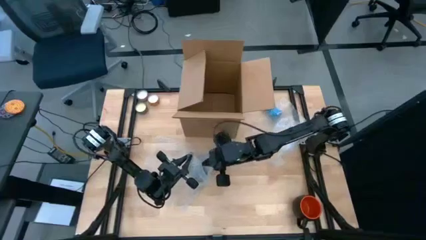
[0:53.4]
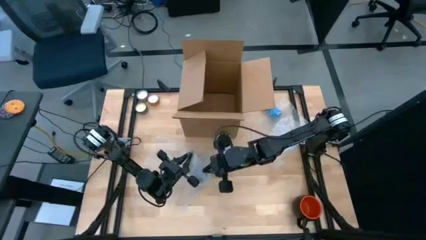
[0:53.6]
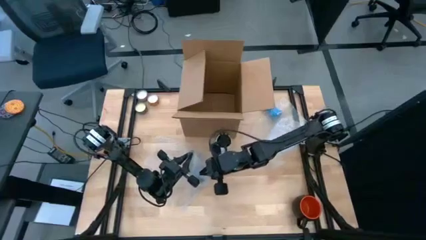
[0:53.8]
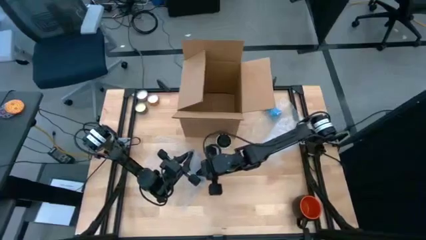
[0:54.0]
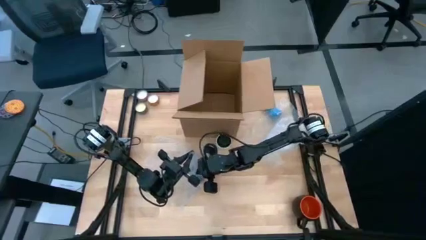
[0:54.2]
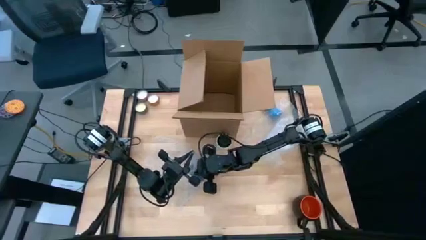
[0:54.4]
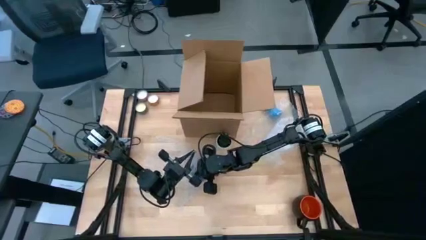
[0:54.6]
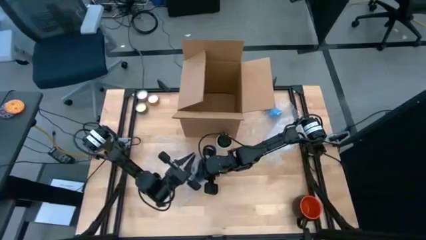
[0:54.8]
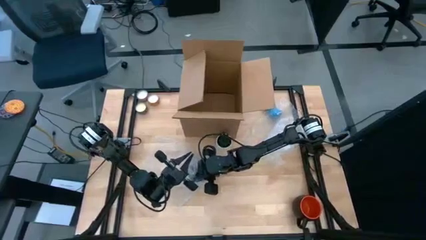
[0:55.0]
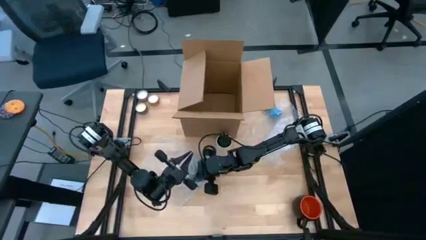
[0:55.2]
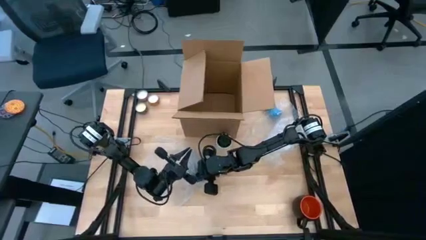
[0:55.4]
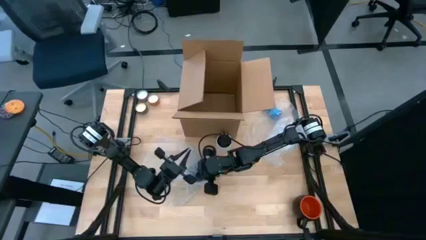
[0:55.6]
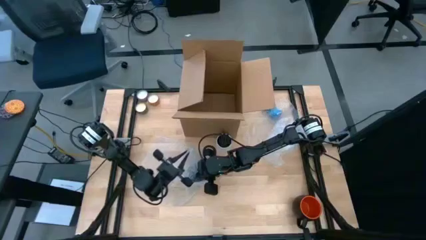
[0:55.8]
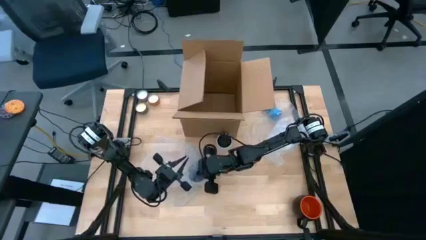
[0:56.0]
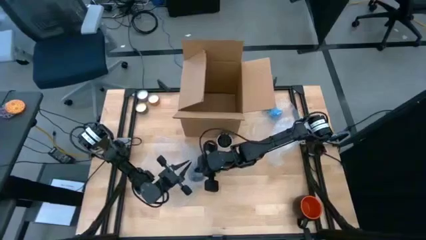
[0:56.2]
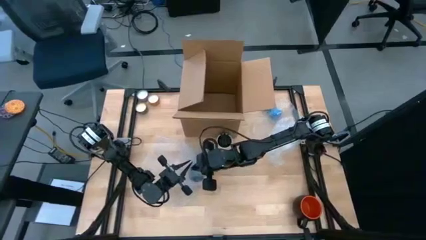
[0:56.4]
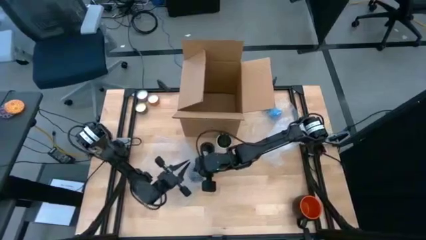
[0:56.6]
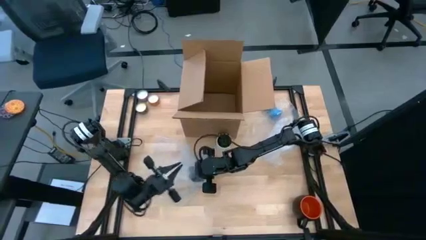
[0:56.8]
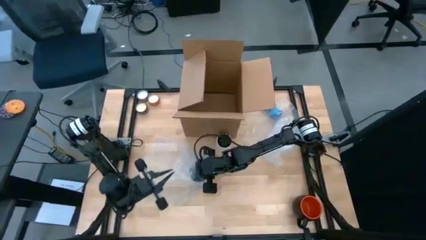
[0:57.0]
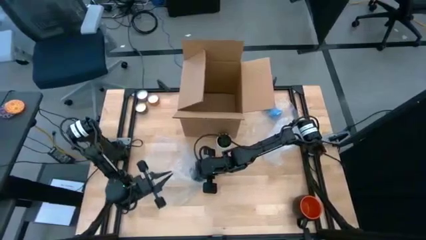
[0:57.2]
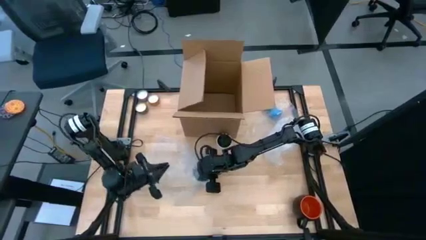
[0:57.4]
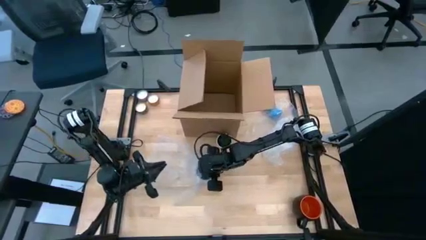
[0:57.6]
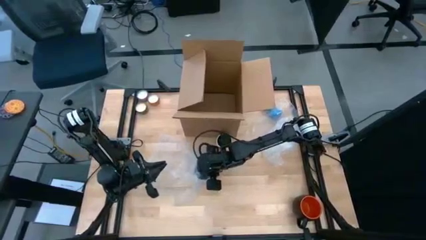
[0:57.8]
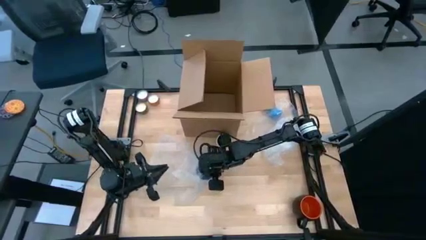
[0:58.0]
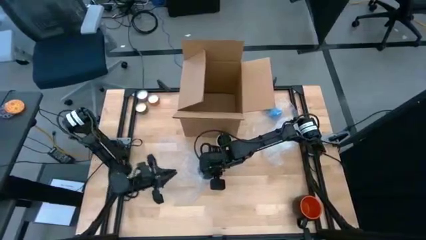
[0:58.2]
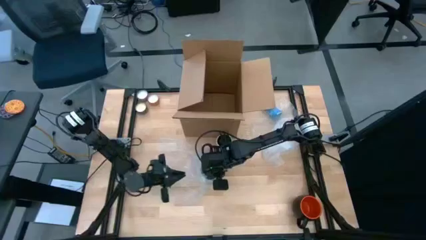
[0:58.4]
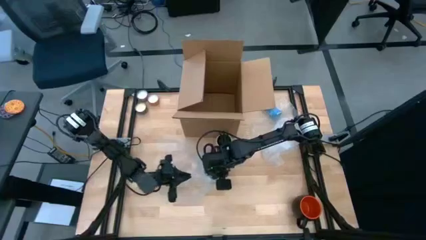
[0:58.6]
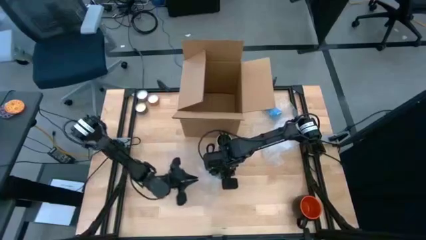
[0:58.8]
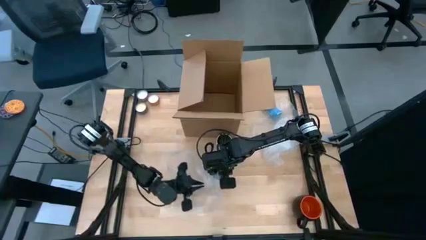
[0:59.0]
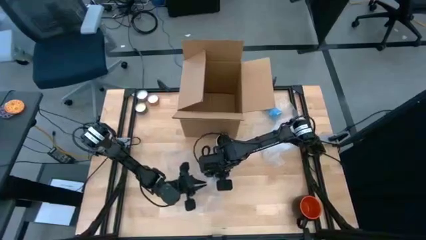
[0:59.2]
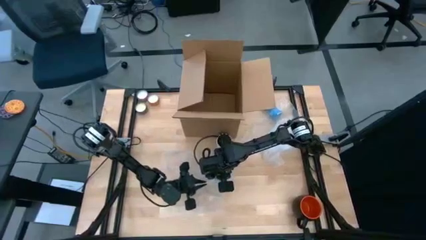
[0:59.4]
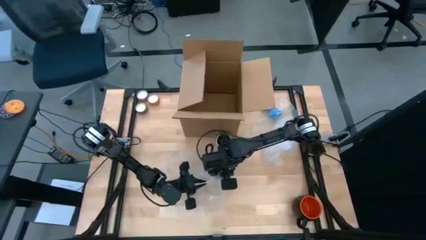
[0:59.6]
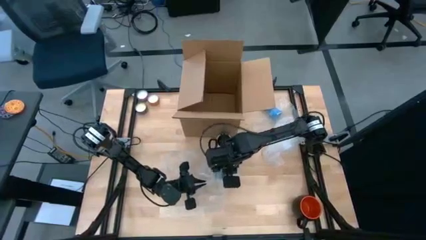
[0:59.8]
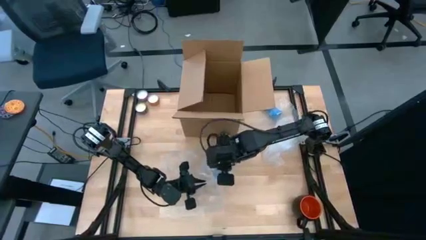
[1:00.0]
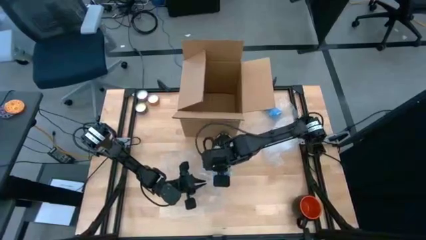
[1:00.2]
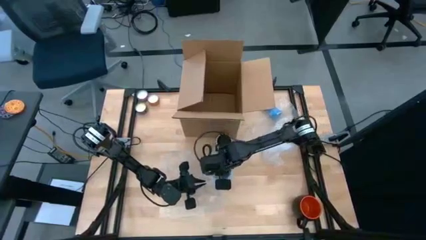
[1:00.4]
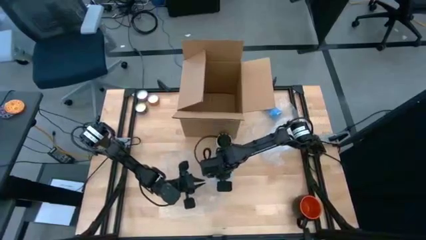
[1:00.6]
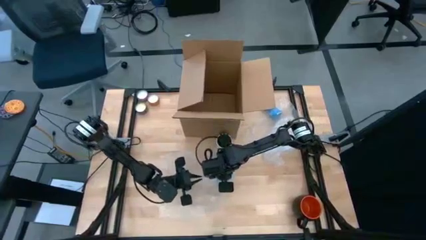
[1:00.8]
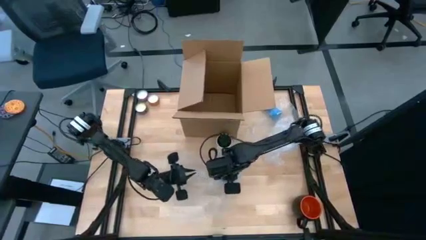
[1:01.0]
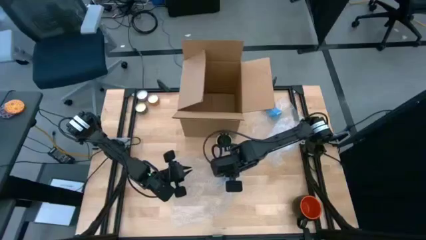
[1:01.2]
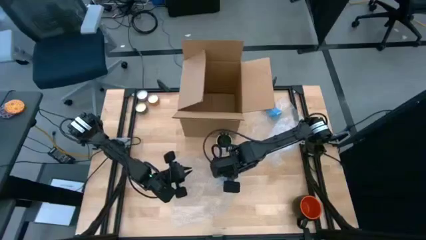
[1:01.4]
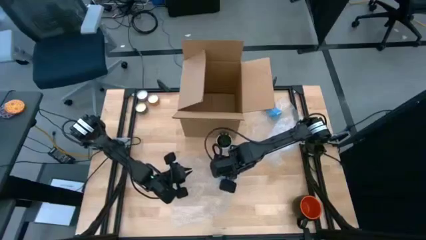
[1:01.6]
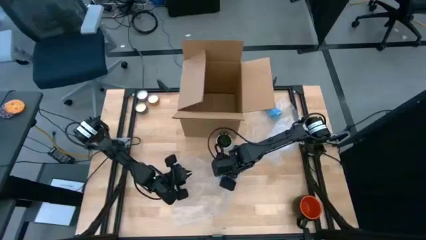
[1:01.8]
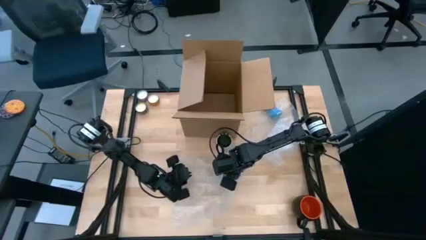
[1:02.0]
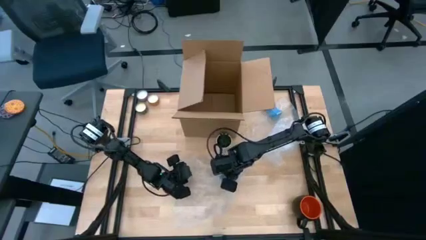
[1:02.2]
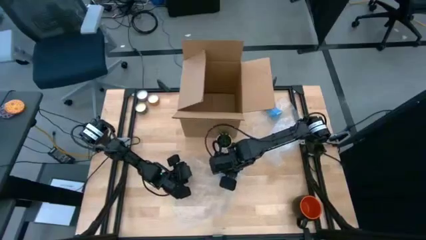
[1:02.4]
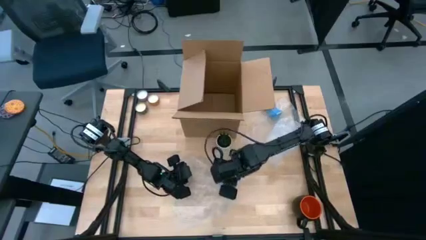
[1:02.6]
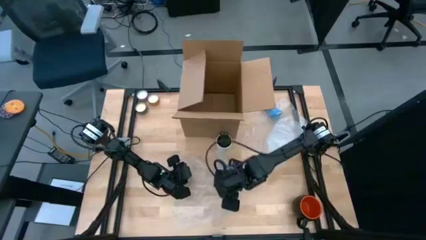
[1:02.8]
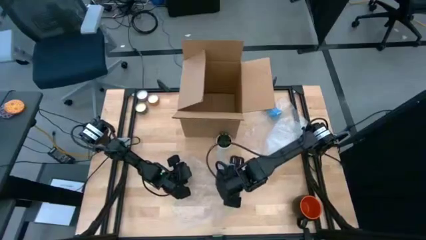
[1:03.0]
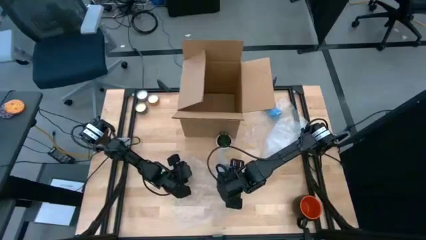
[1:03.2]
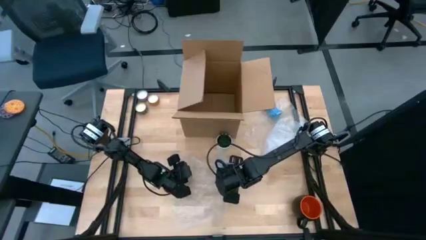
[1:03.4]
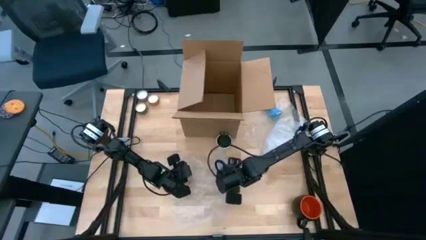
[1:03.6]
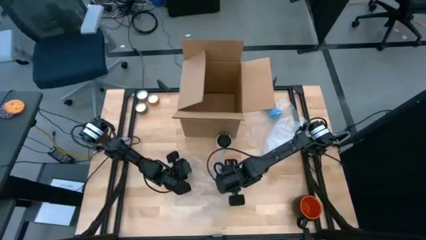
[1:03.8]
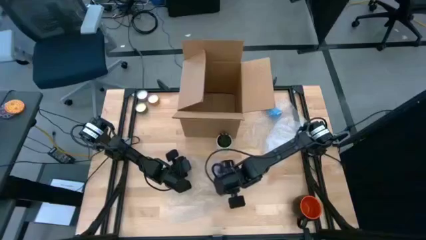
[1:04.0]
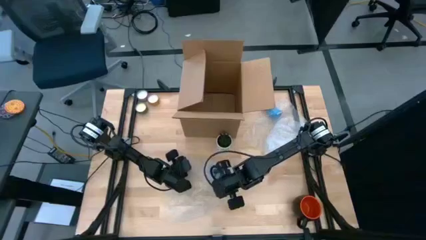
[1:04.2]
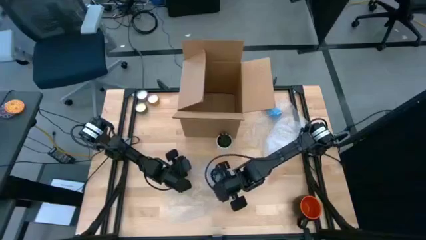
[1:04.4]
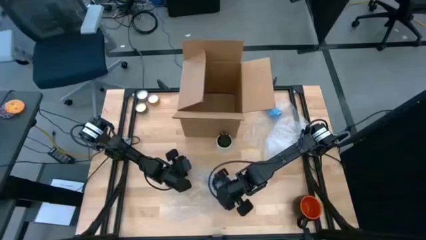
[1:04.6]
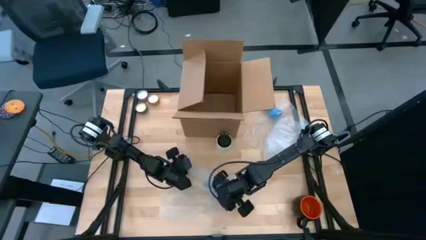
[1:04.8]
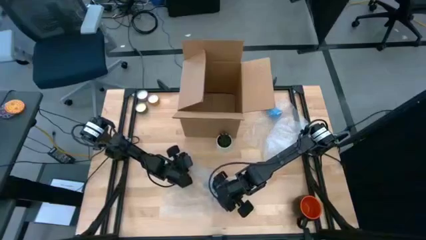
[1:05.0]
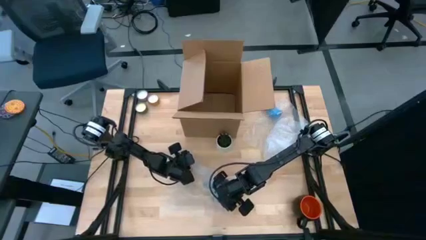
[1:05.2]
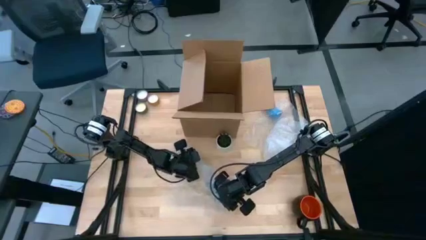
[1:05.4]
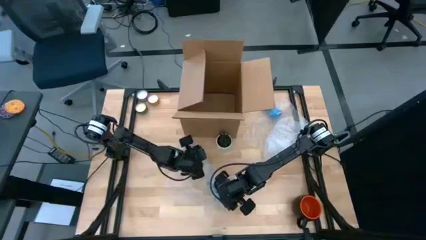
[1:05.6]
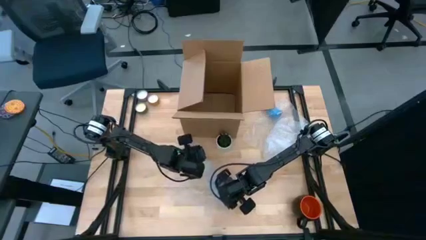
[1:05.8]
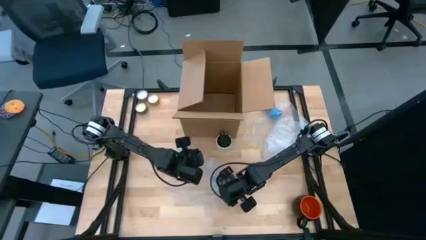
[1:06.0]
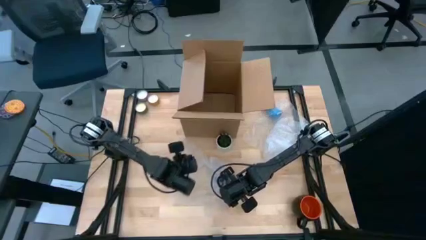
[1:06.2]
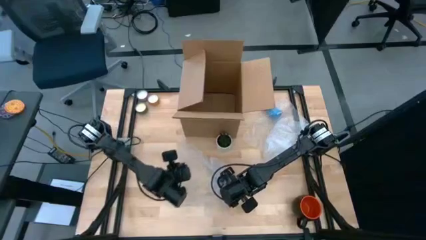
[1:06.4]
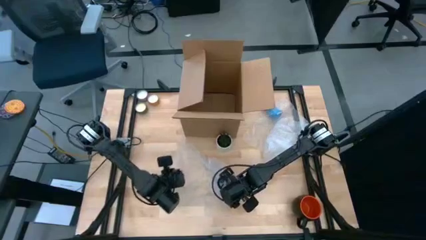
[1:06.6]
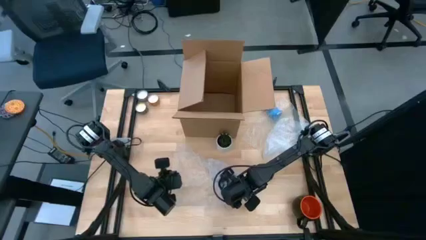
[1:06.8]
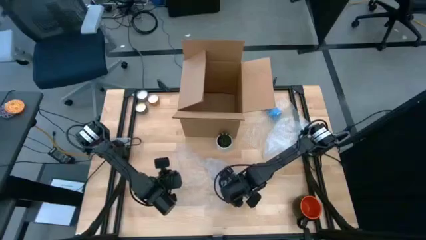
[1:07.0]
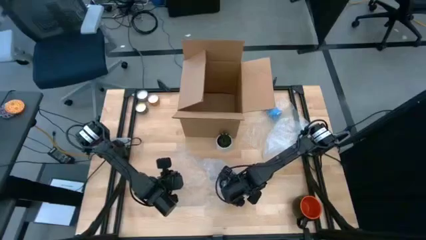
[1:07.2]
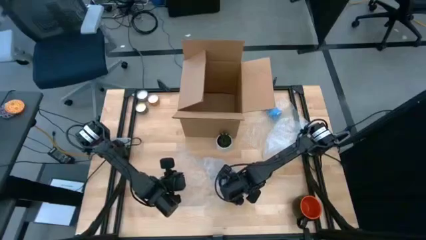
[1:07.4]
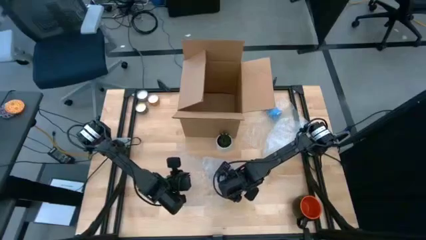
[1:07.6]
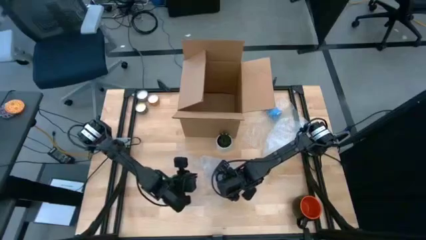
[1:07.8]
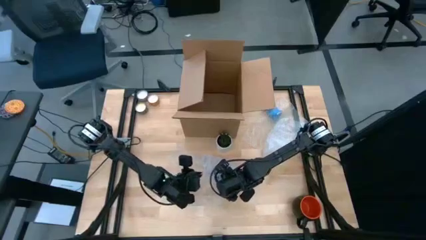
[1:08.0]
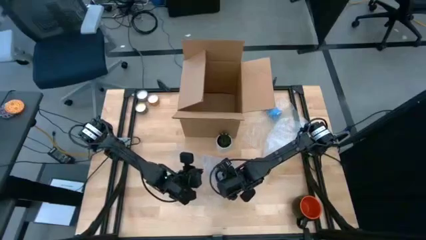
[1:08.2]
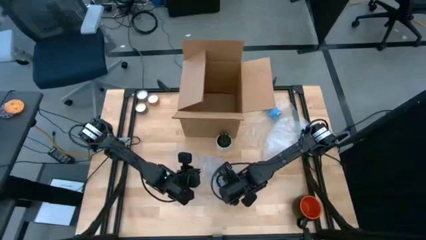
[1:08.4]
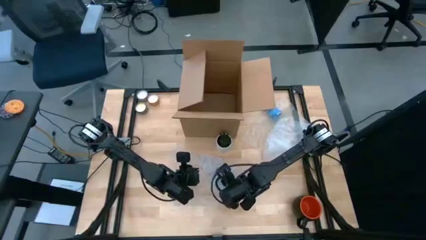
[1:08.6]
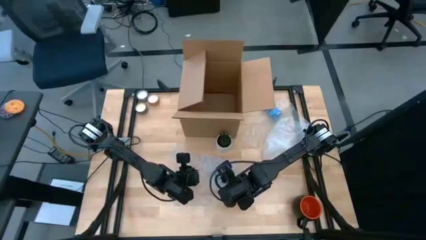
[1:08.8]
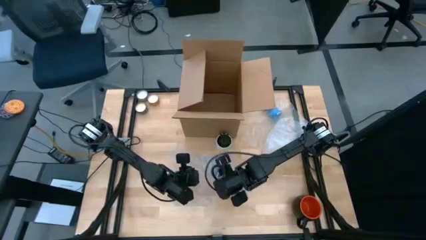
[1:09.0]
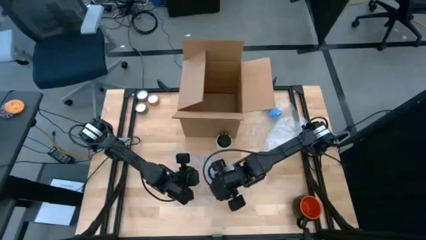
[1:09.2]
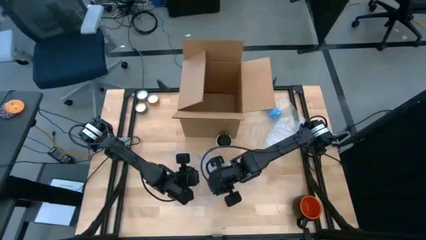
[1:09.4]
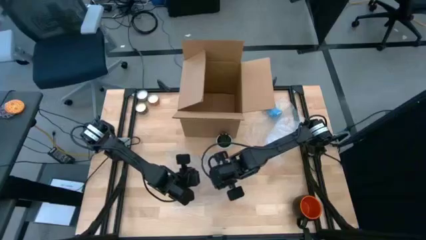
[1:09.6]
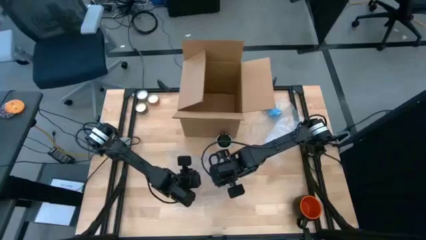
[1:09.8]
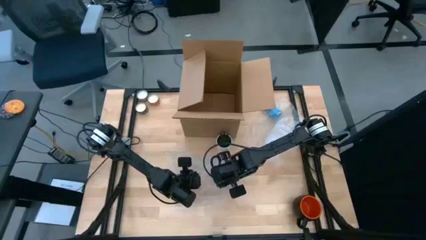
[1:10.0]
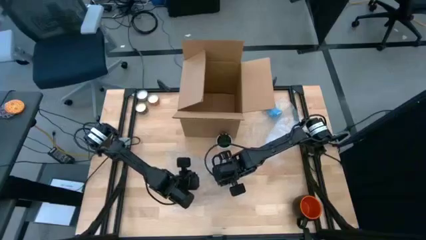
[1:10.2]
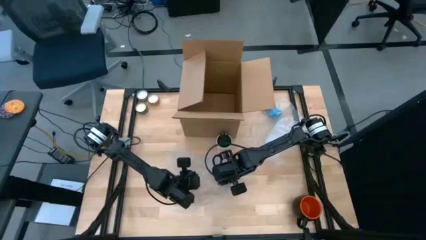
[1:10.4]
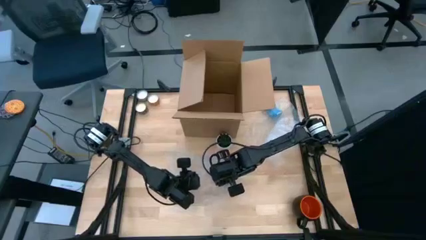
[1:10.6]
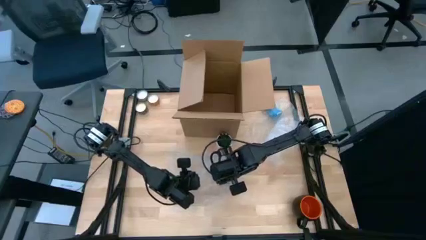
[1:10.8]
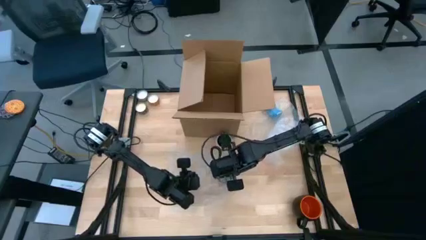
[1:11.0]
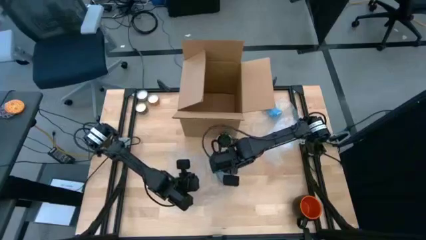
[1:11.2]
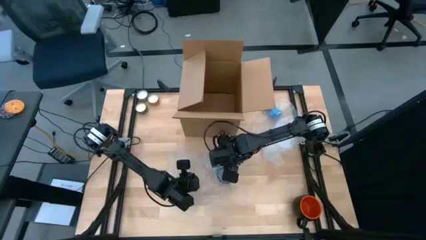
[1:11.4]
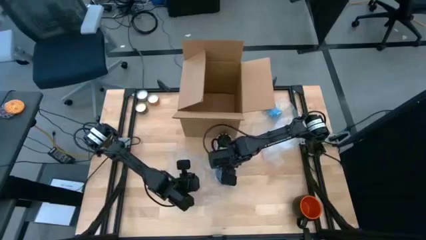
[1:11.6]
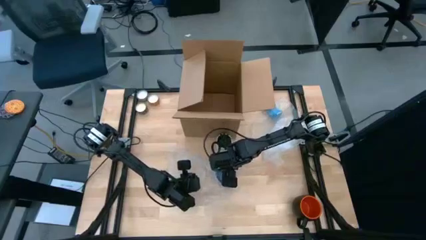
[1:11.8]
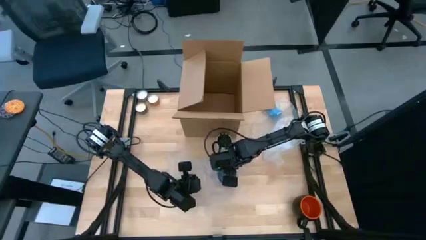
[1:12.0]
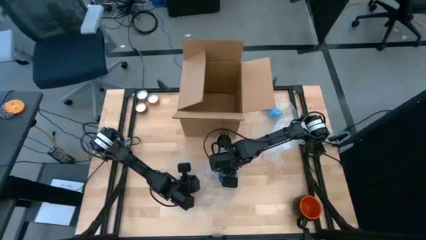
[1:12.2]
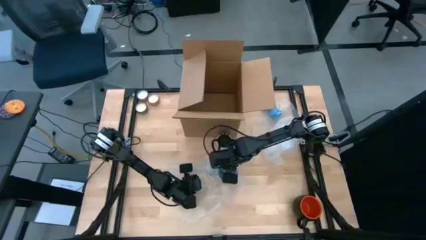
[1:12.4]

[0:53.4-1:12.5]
Task: wrap mug
Wrap the blue cup with the transparent bubble wrap
